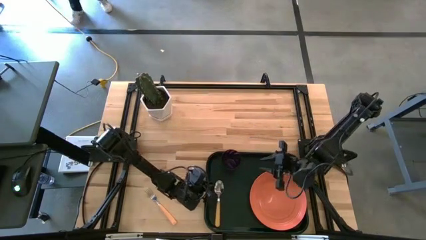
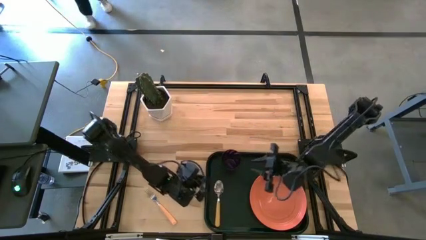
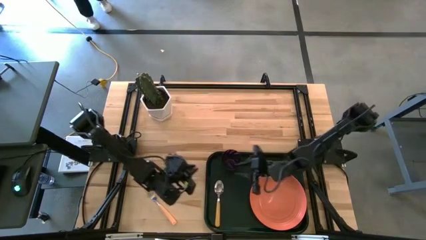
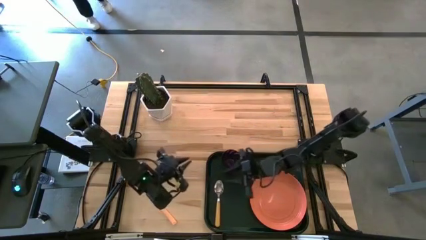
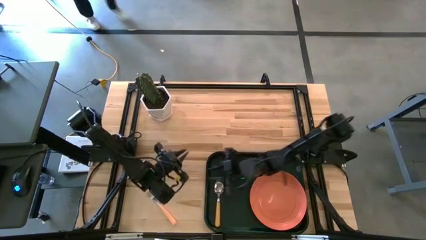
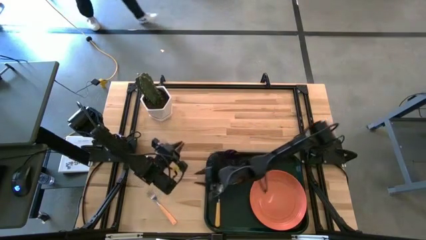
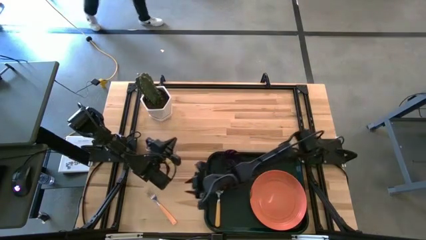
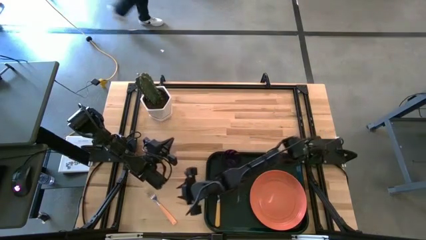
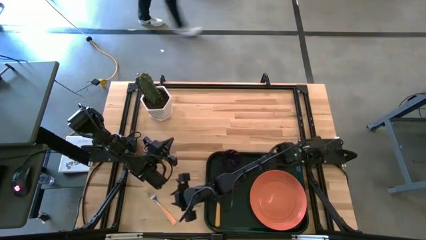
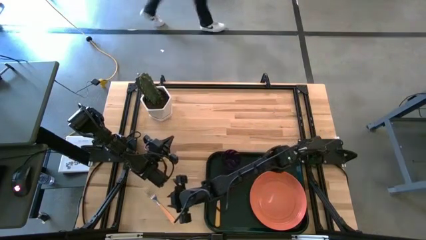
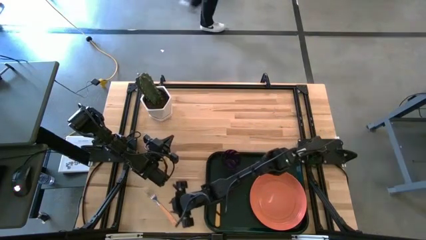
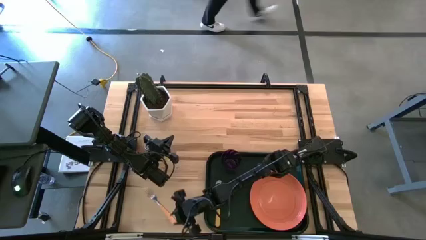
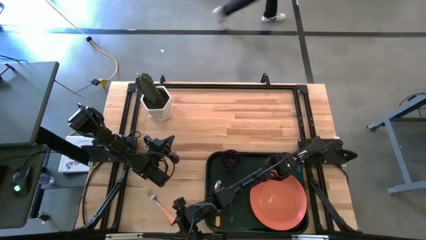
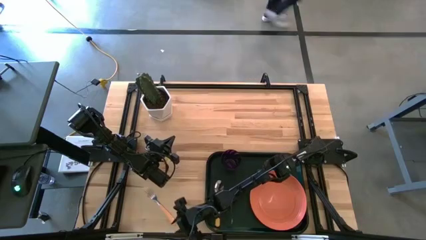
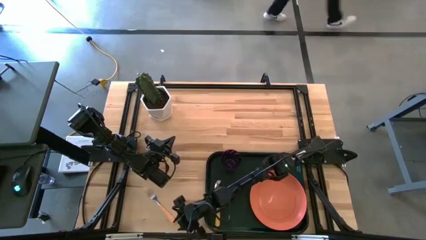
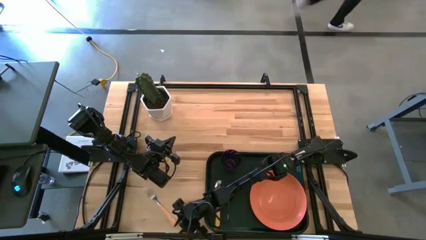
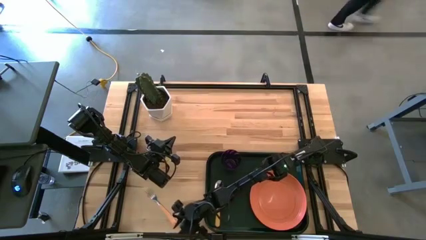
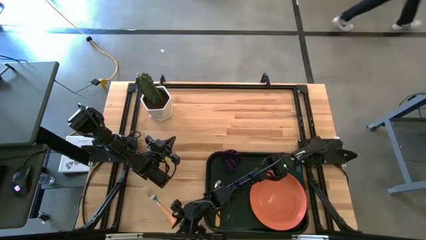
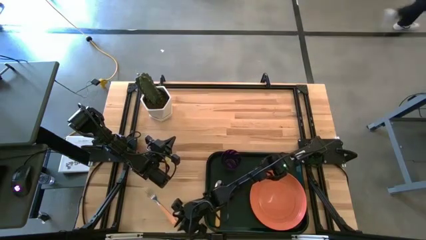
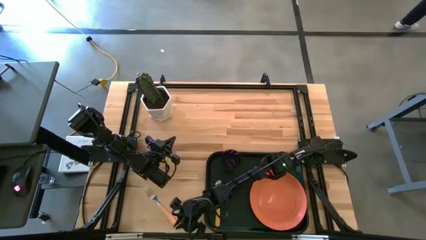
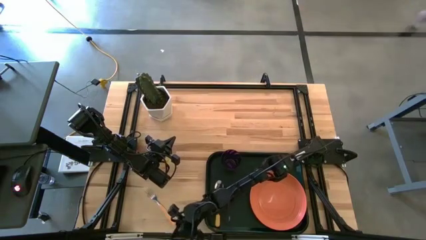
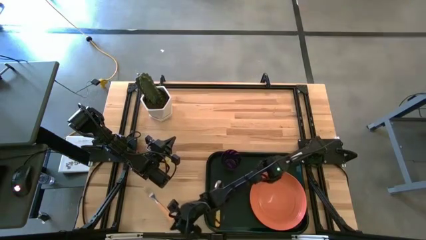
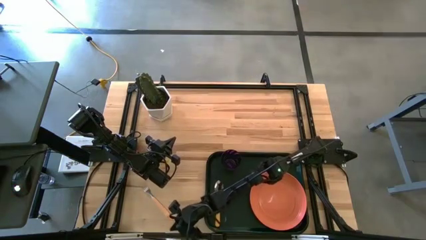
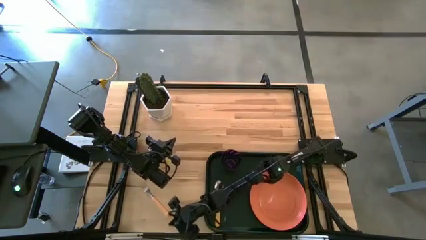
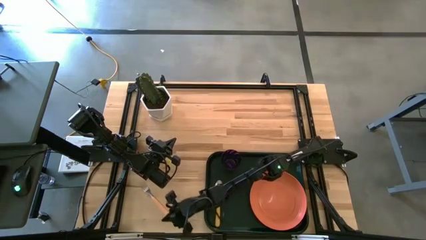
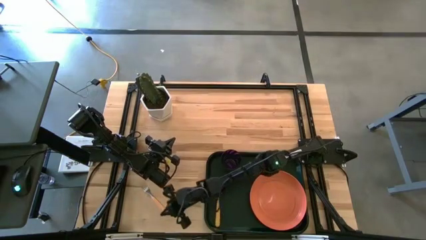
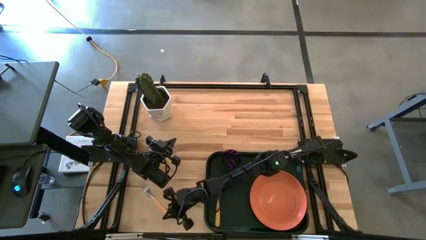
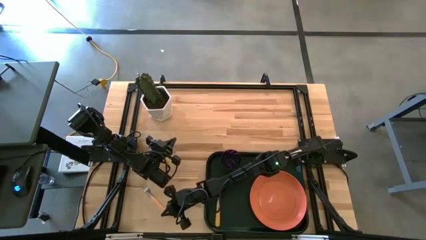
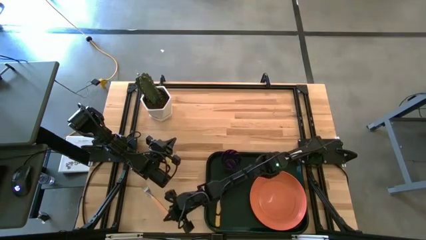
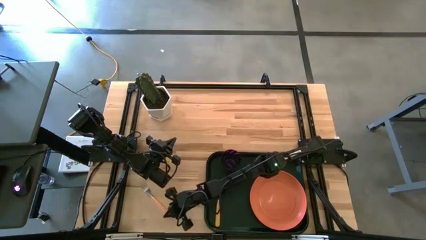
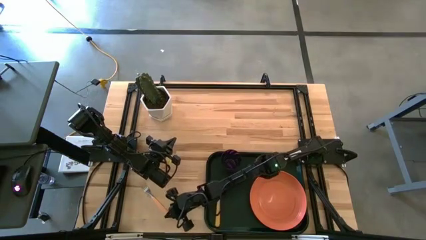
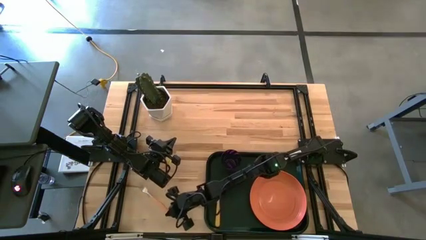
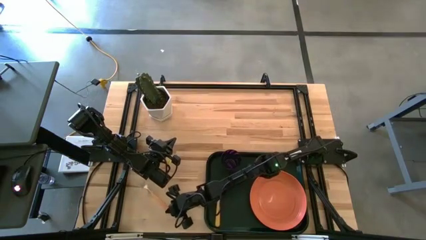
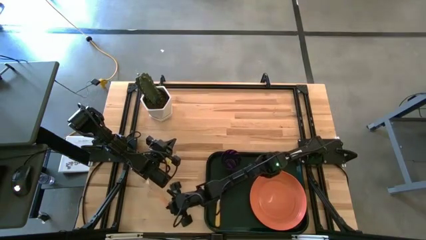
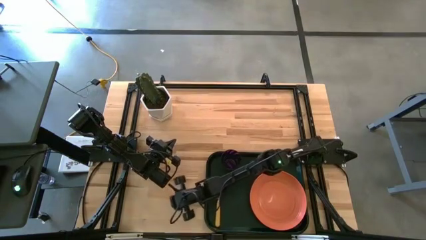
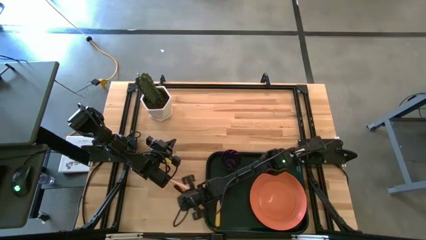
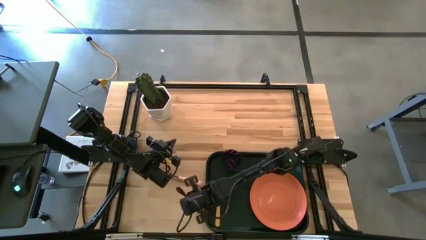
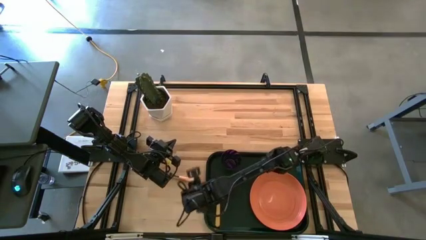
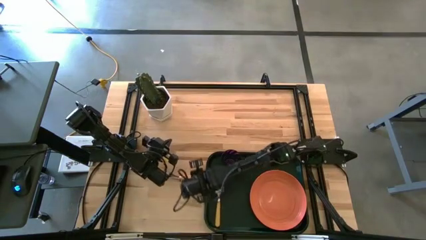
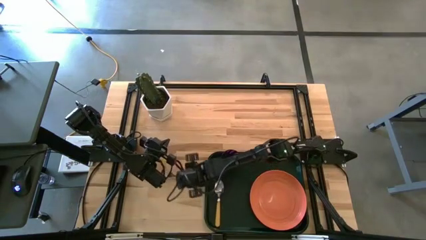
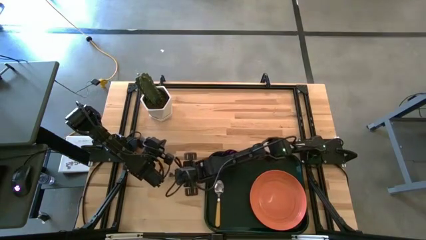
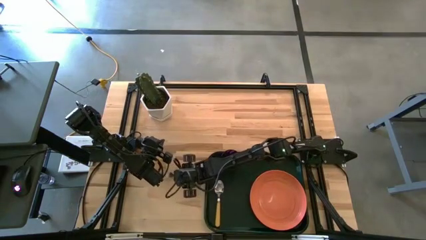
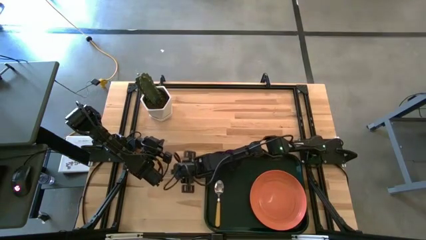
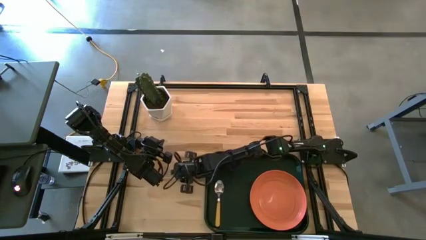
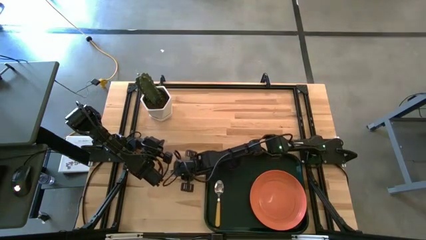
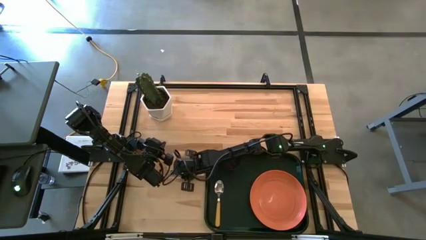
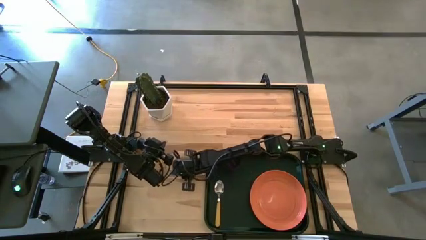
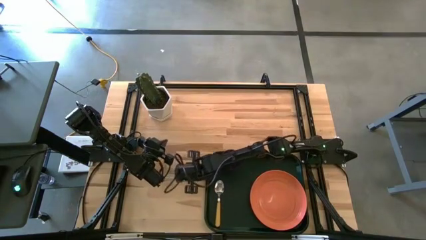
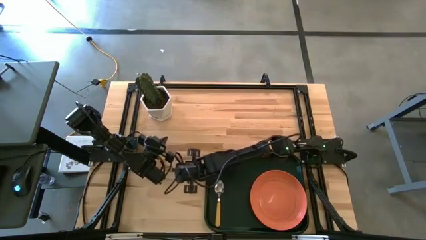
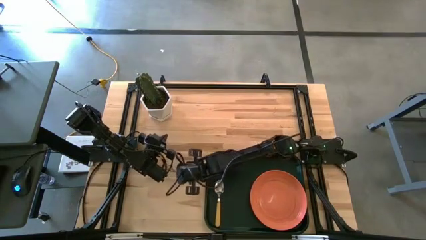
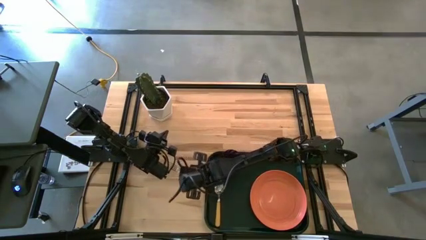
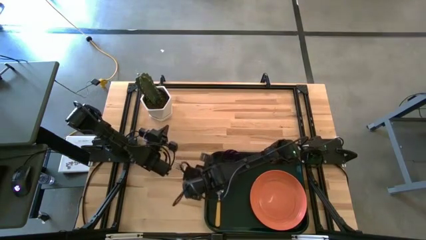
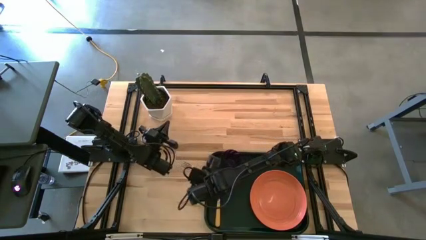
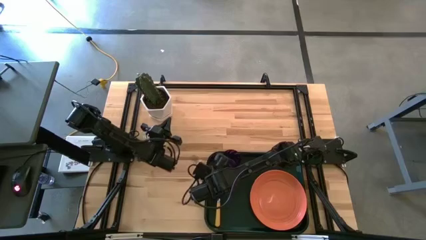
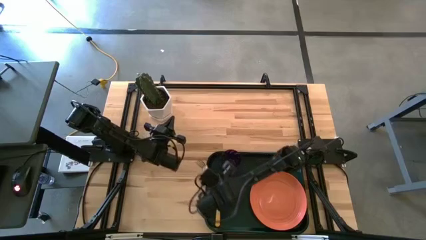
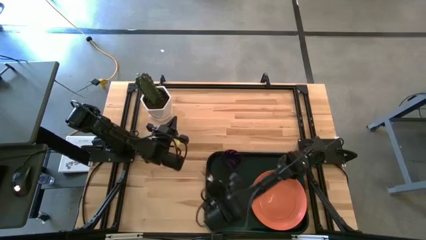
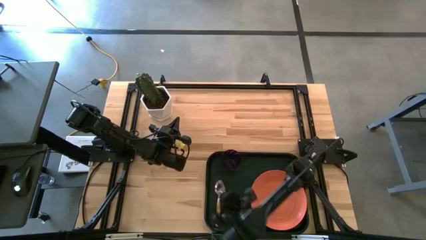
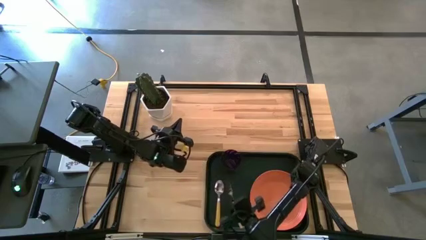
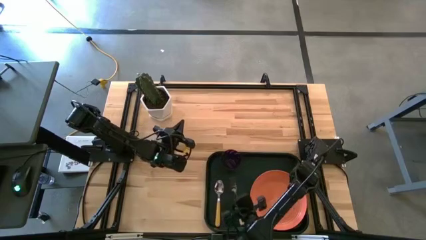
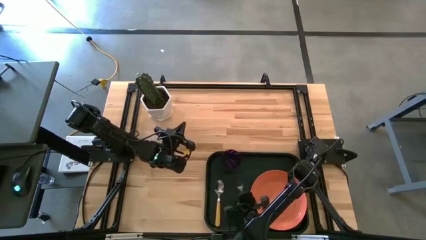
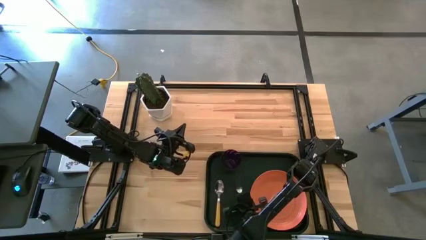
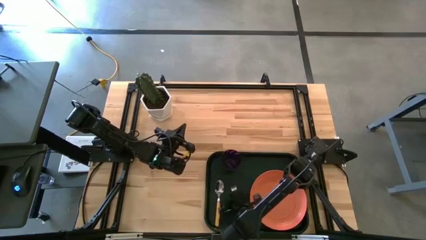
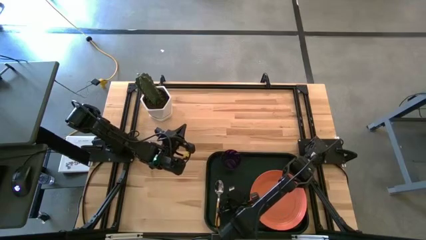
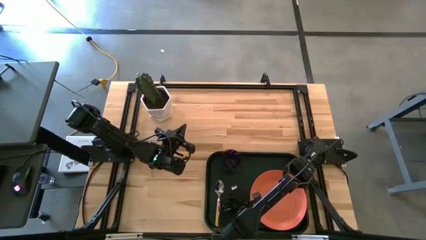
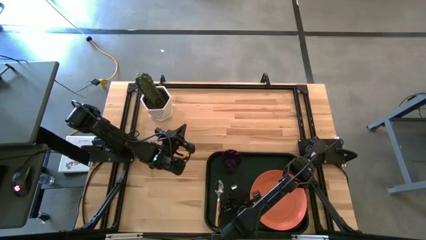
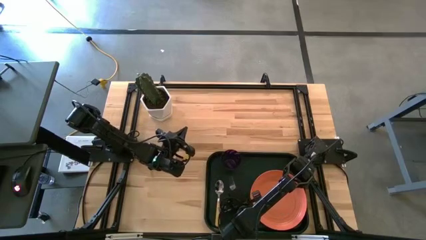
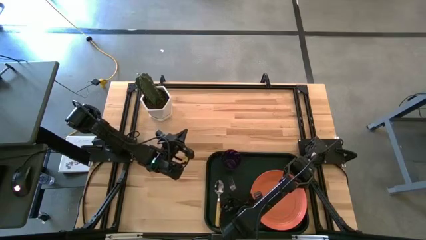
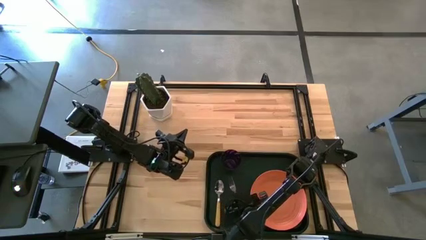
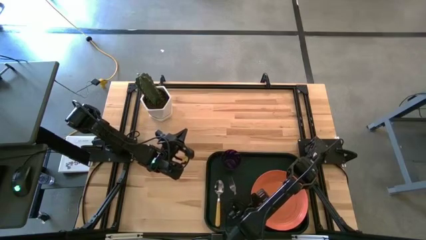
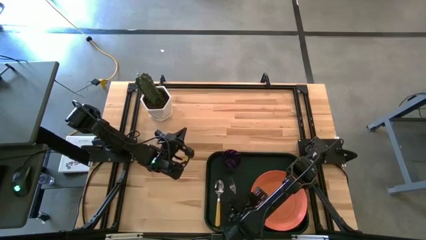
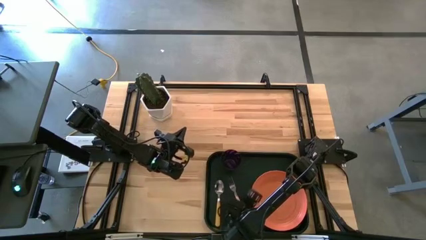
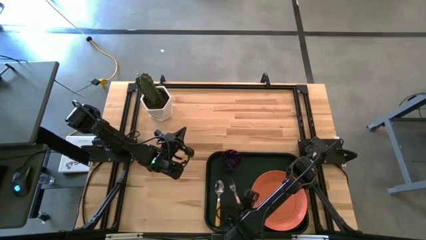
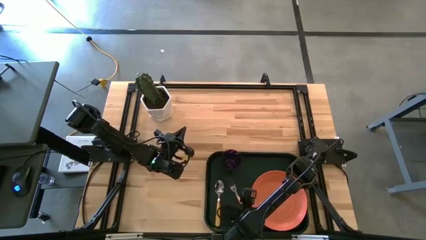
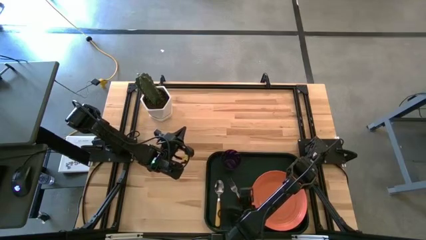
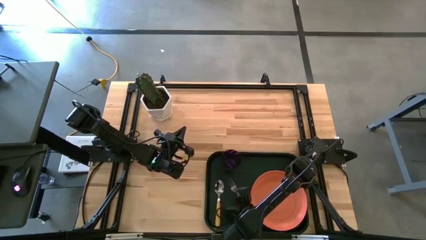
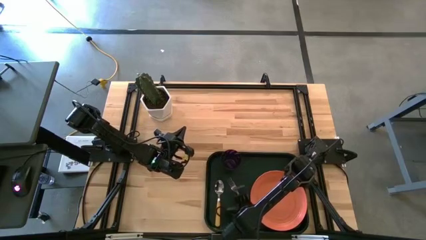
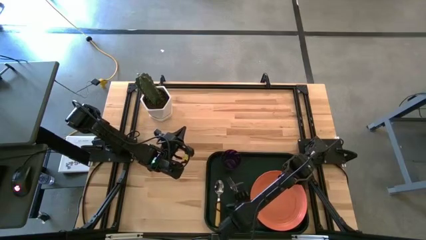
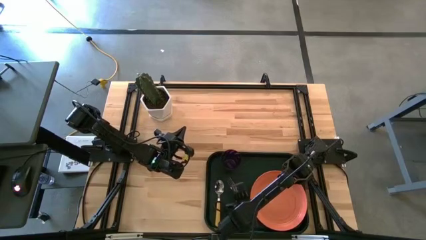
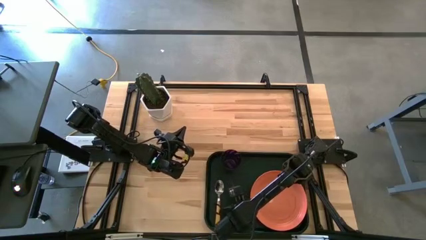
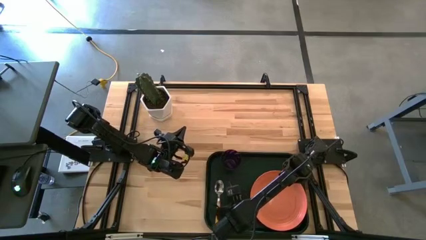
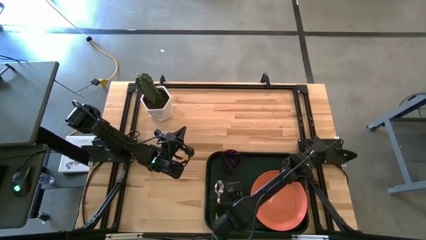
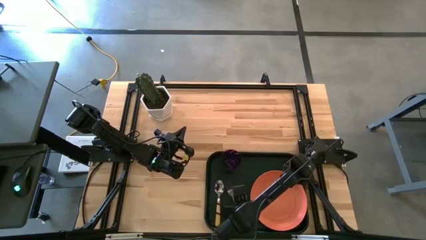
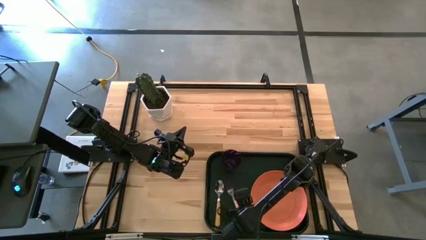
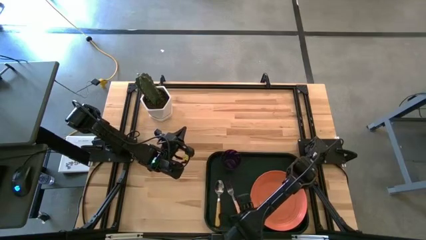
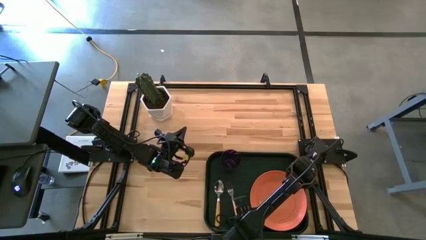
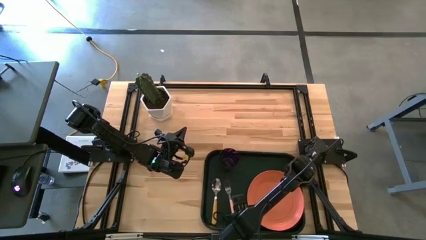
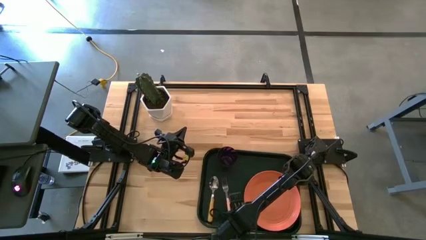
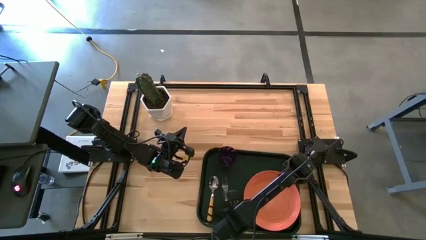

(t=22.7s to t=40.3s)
Task: Pick and place plate/cup/fork/spoon on tray
Put the orange fork on the black serving tray in between the yellow spoon and orange plate
